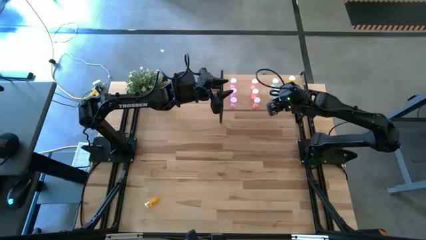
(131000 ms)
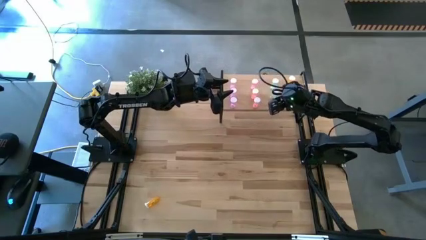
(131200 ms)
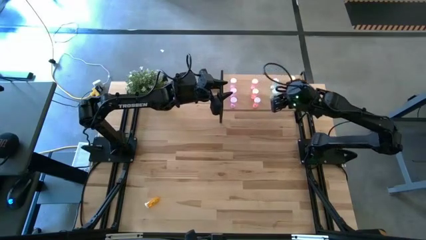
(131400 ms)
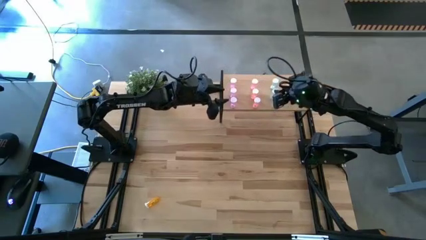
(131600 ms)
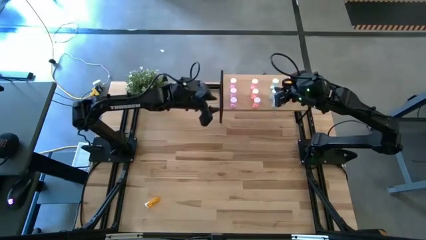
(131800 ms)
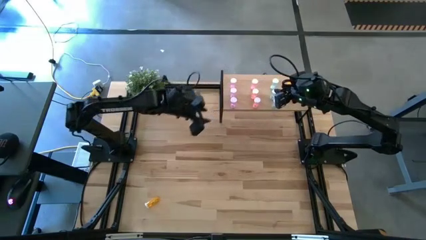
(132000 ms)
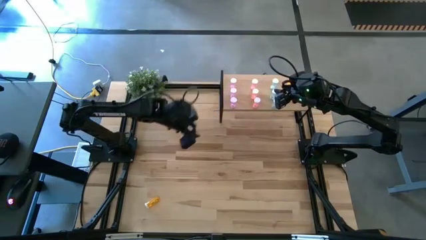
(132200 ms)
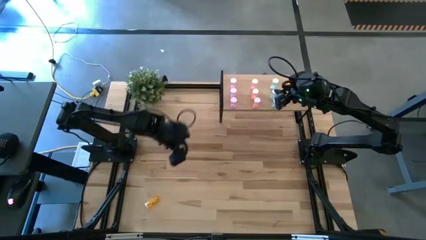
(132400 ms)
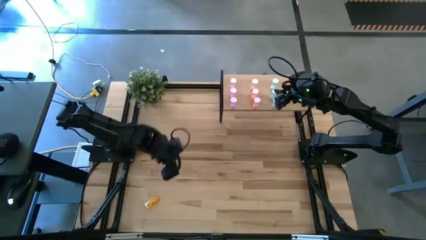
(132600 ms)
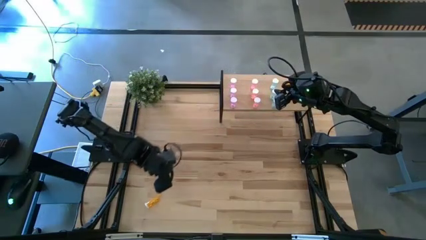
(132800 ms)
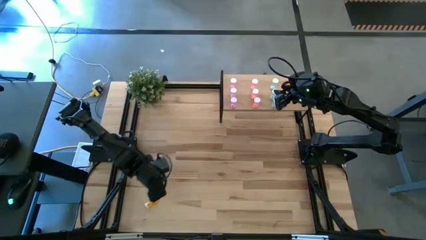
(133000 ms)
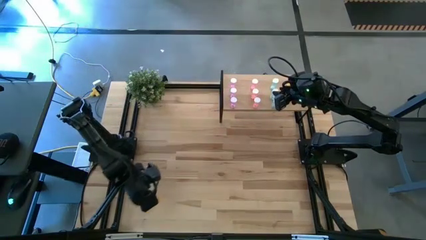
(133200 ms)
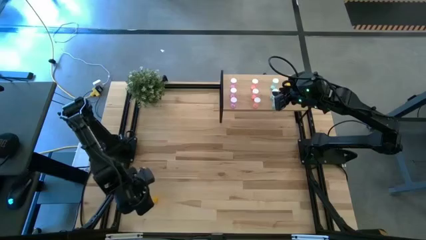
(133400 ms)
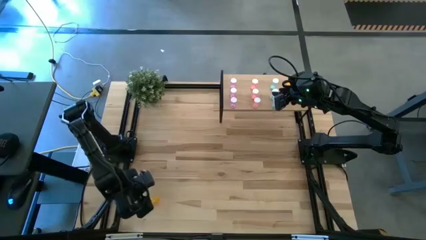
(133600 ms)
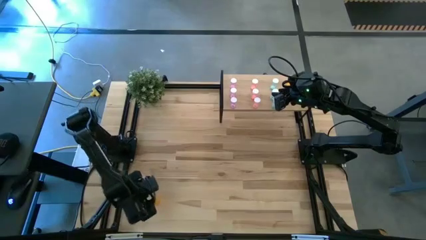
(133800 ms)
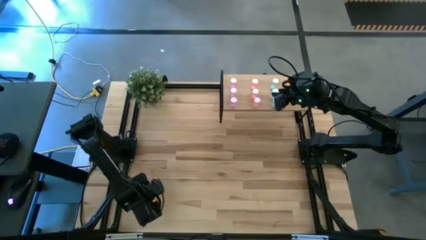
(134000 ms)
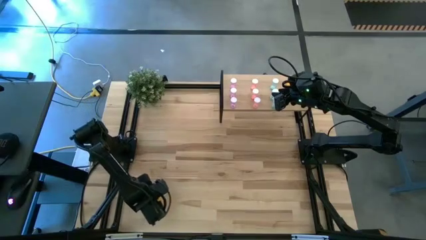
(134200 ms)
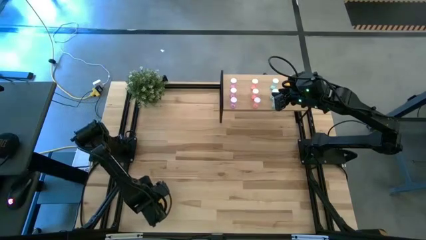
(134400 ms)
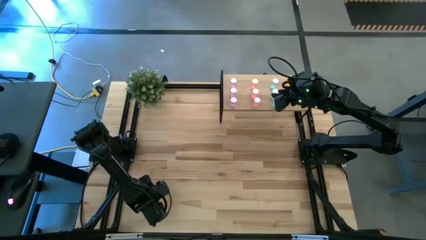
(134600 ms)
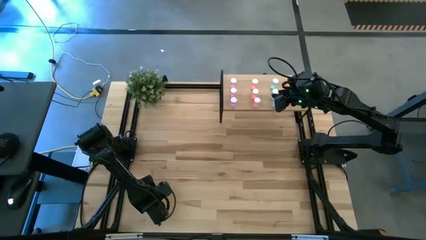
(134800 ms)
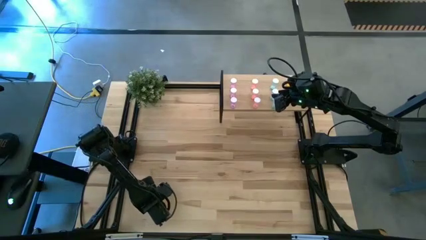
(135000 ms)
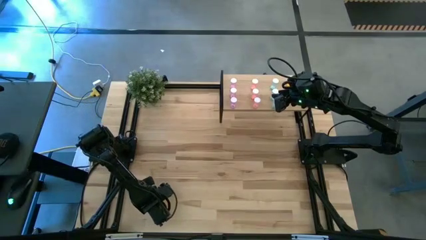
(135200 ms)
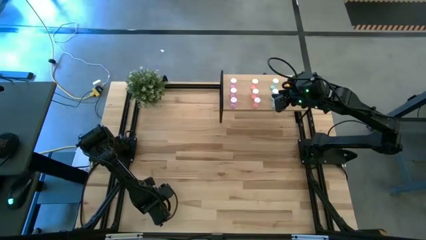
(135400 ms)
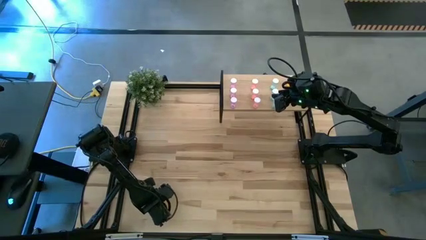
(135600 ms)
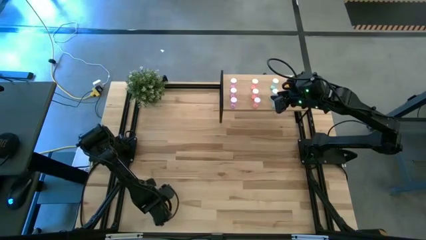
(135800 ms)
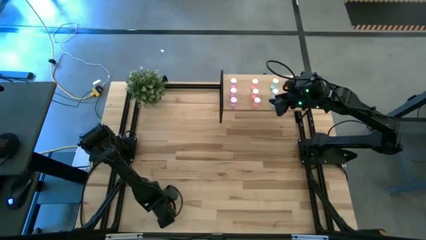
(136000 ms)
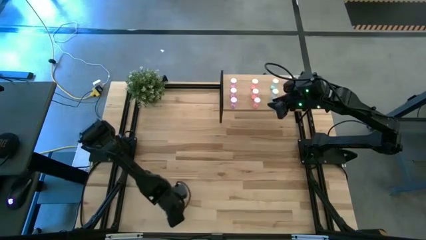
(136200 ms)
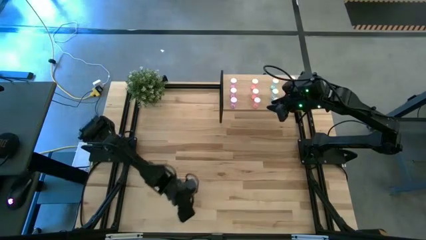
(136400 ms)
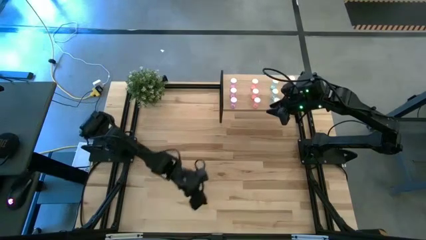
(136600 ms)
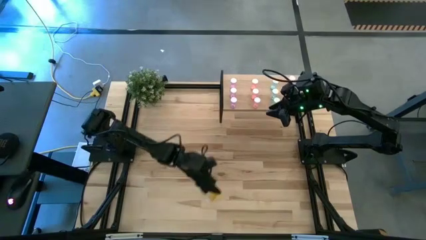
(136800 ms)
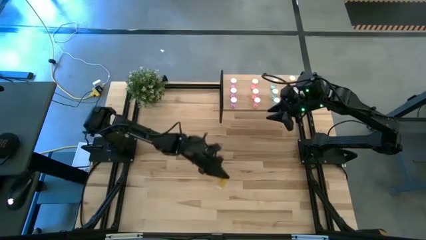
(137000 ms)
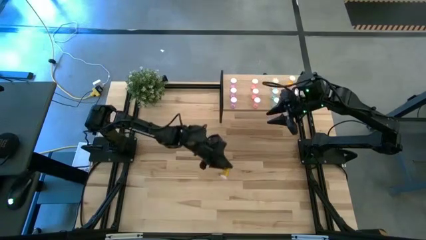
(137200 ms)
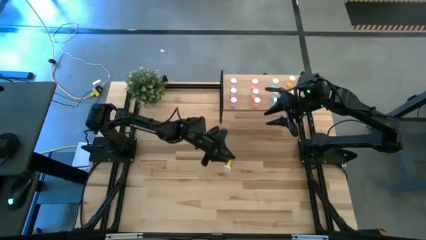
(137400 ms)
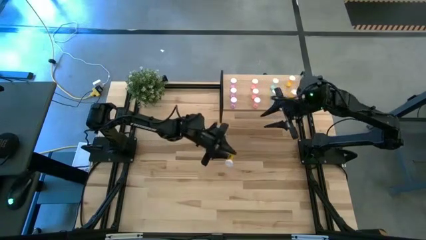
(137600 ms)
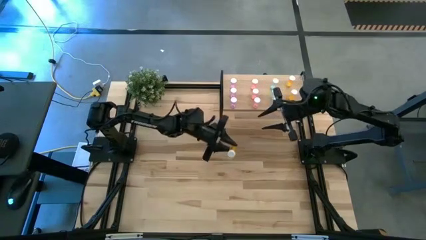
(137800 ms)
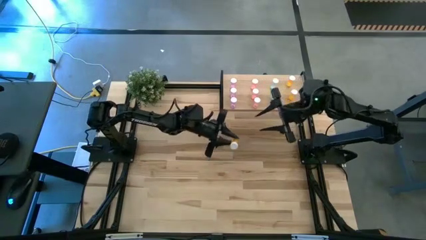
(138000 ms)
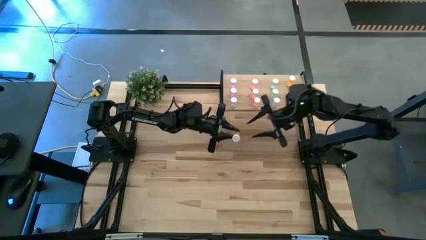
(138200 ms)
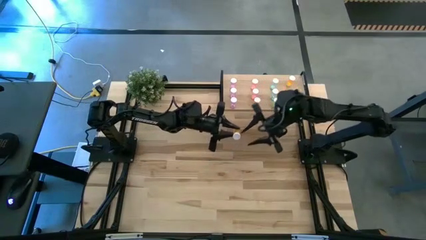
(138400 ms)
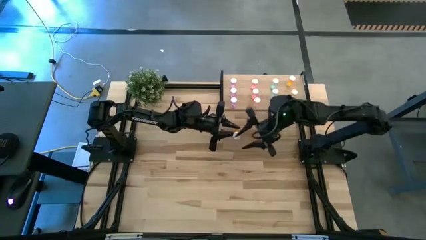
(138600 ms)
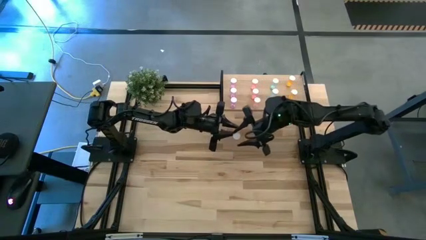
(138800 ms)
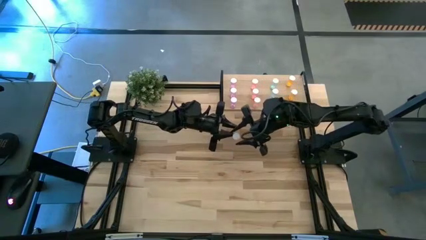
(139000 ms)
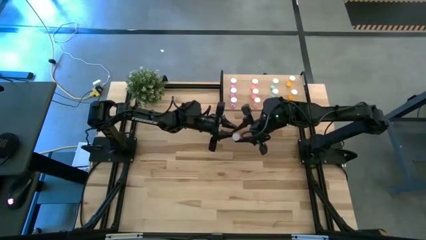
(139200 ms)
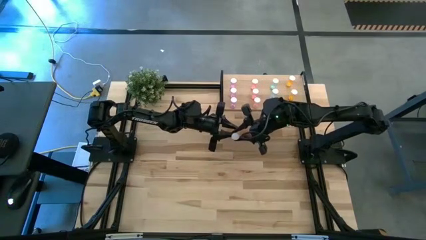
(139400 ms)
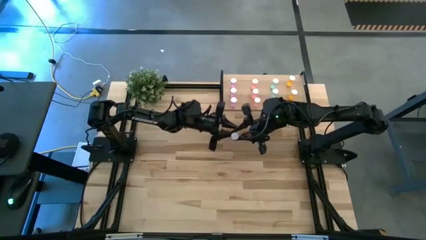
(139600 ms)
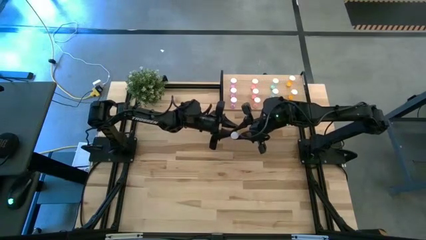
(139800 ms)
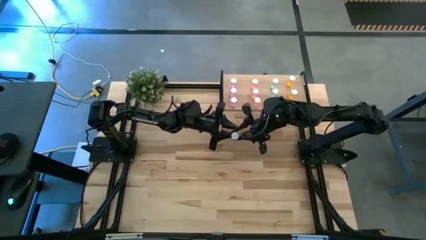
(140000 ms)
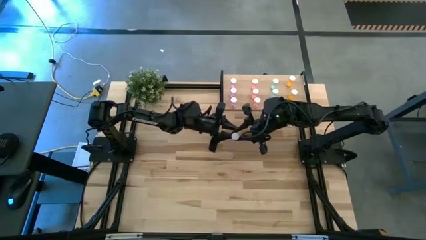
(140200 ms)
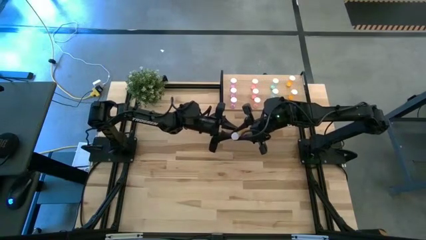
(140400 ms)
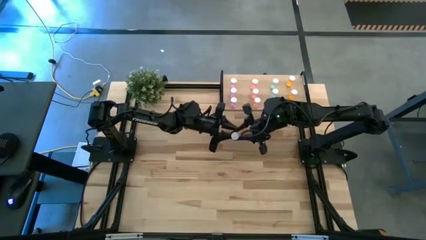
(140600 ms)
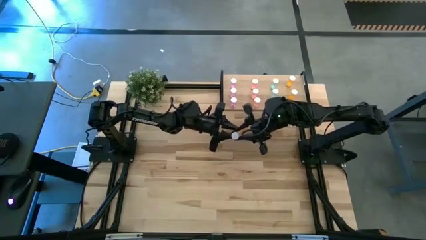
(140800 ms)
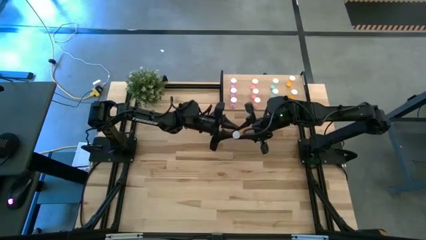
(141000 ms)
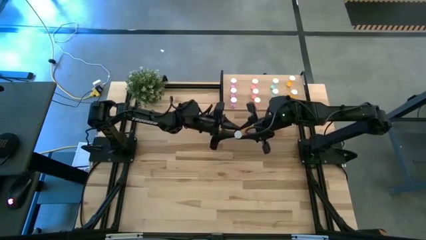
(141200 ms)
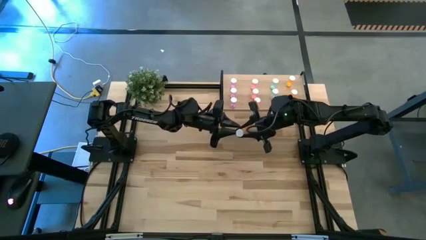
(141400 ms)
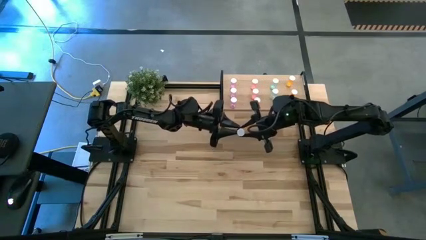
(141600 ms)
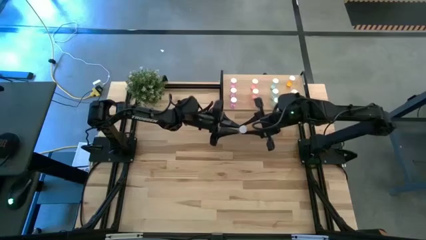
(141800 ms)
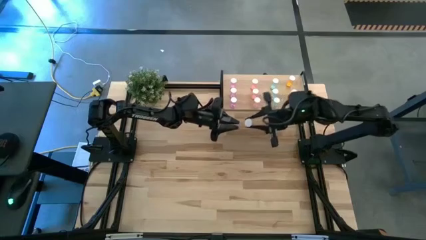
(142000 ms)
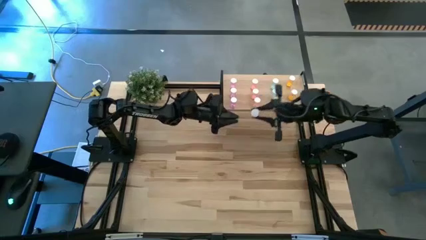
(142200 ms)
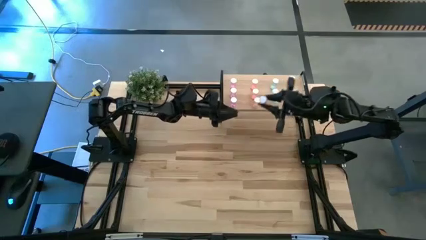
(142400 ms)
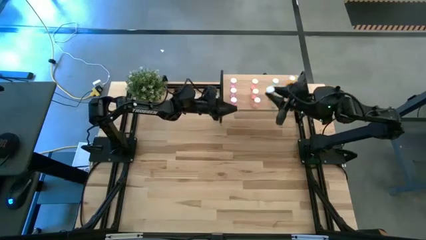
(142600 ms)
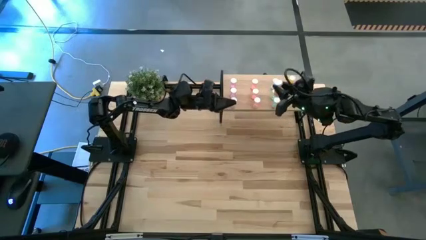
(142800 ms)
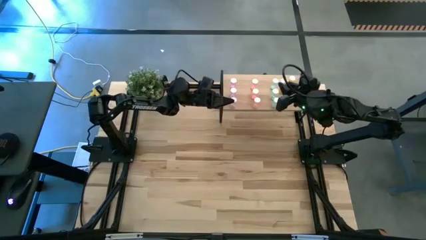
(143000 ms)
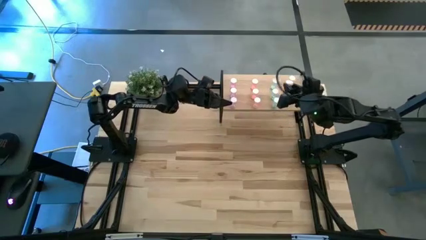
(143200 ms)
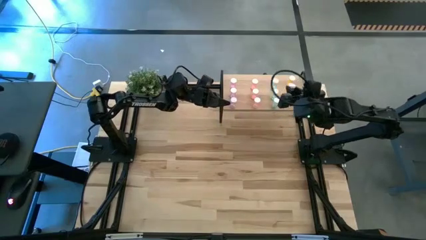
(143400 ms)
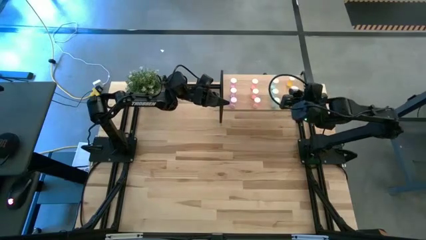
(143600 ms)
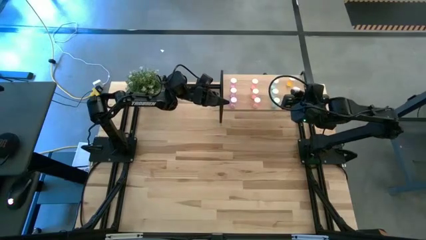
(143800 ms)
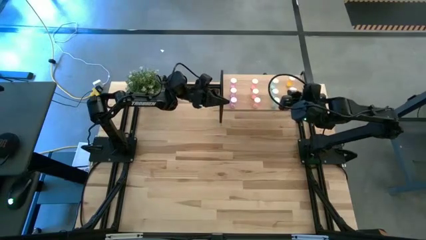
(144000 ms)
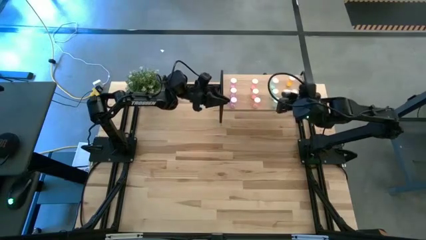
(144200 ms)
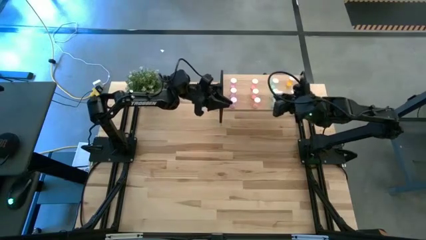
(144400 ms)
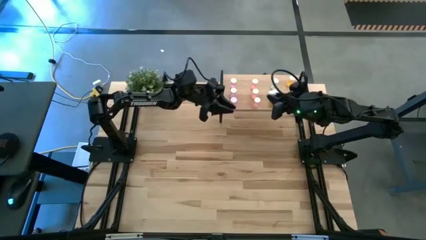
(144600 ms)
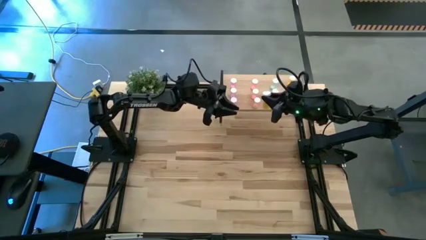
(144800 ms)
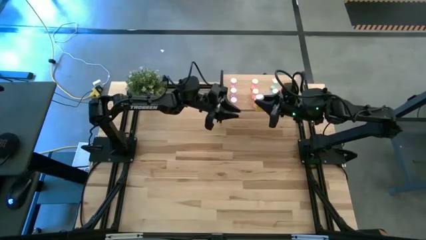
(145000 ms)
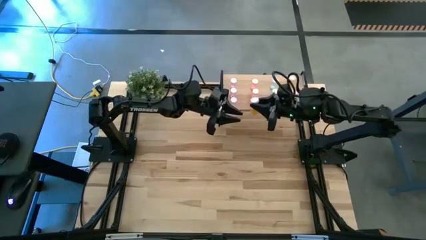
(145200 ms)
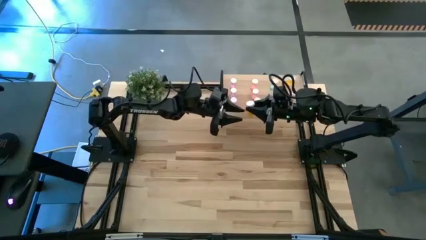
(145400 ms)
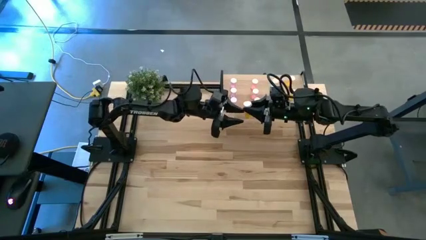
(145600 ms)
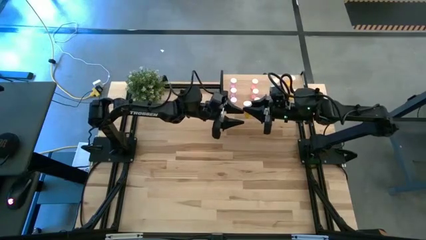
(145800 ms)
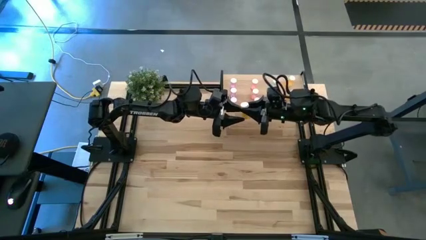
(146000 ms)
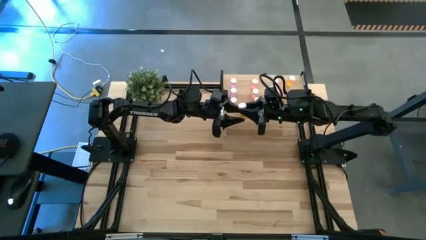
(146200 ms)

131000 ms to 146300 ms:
Task: Pick and place medicine bottles onto shelf by color
Put the orange pill bottle on the shelf aligned with the other orange pill bottles
